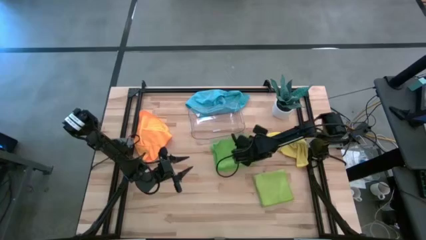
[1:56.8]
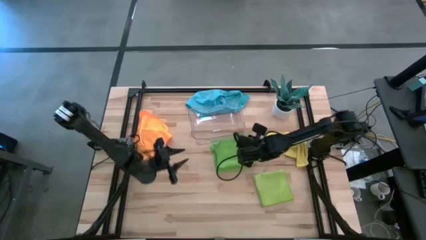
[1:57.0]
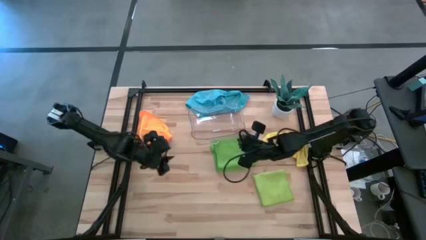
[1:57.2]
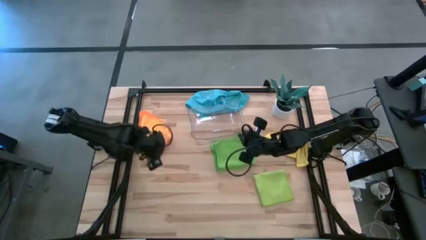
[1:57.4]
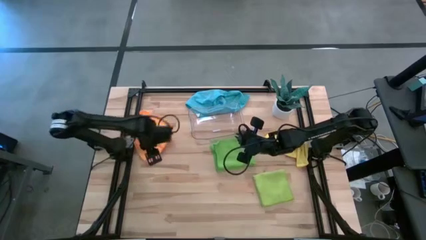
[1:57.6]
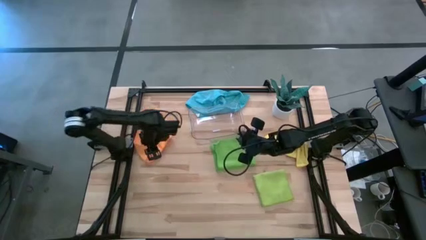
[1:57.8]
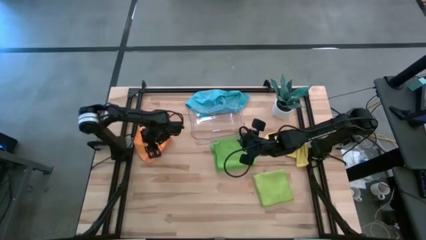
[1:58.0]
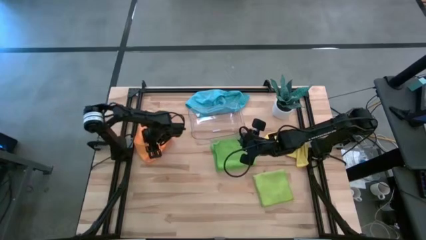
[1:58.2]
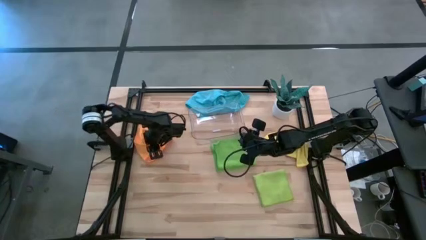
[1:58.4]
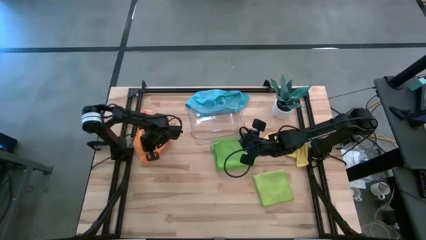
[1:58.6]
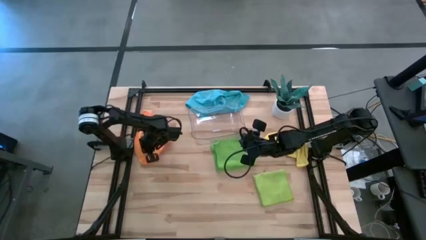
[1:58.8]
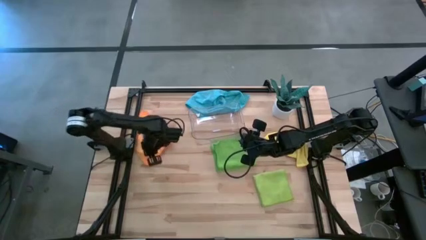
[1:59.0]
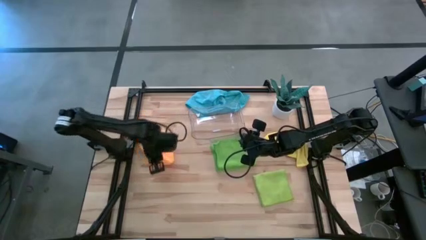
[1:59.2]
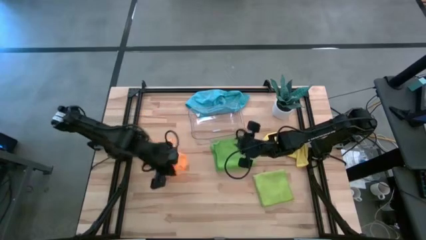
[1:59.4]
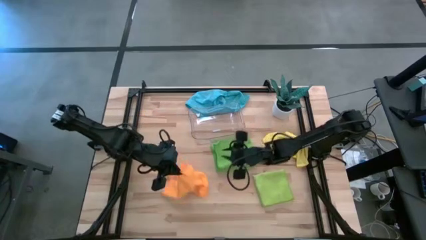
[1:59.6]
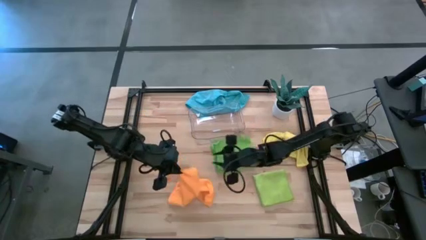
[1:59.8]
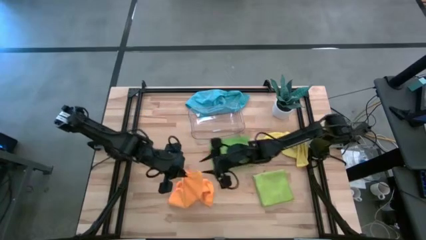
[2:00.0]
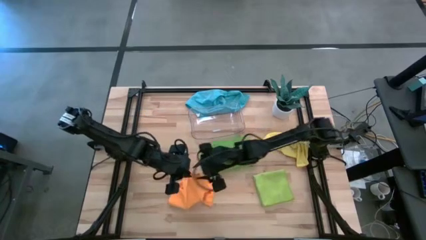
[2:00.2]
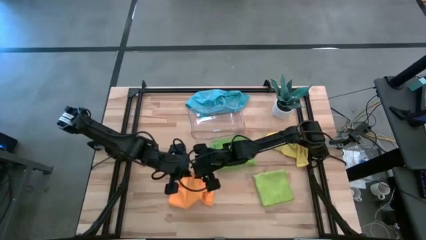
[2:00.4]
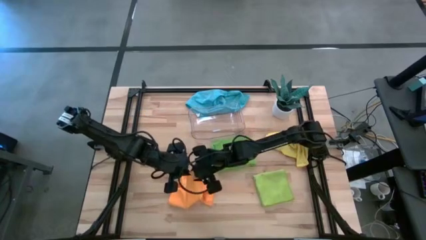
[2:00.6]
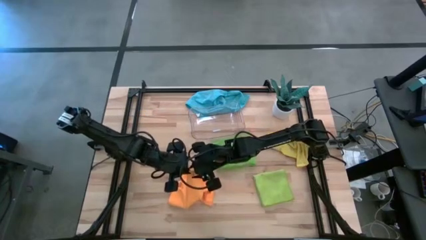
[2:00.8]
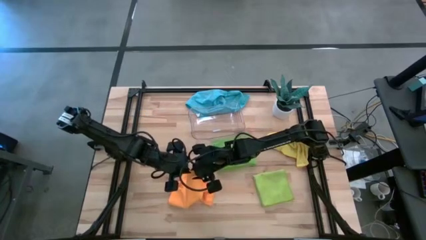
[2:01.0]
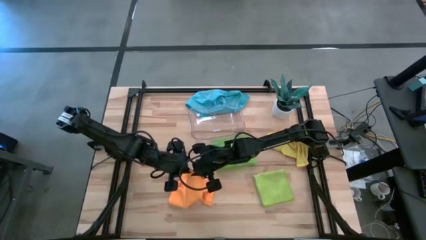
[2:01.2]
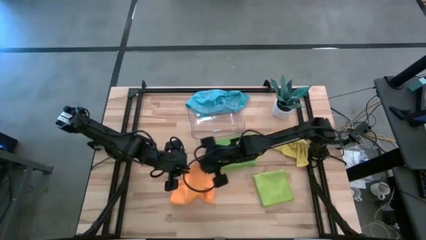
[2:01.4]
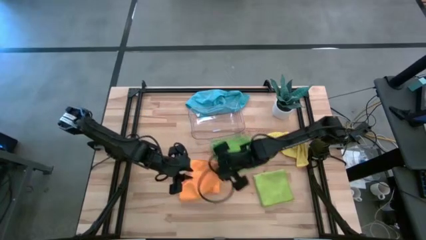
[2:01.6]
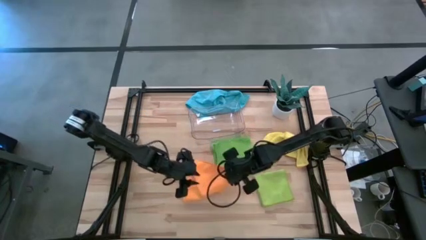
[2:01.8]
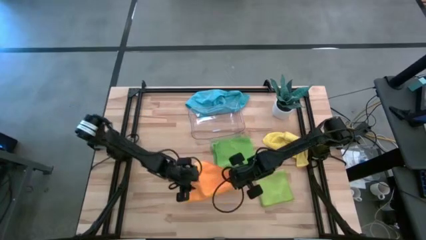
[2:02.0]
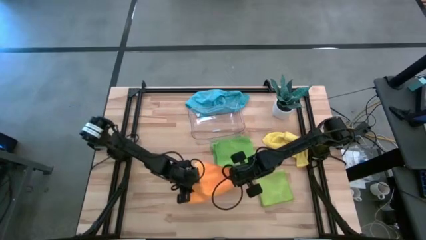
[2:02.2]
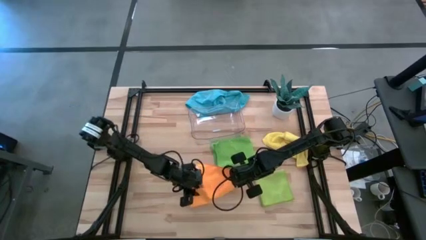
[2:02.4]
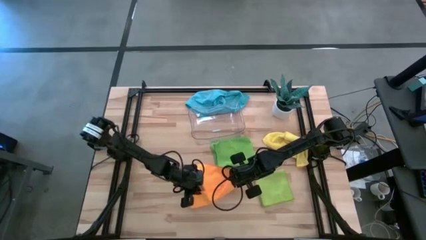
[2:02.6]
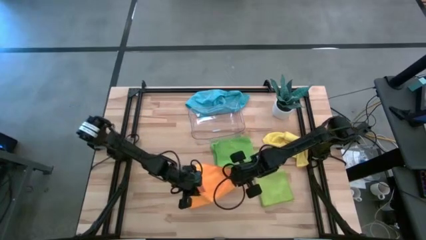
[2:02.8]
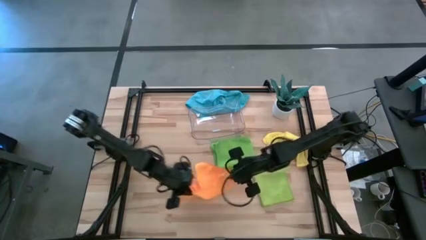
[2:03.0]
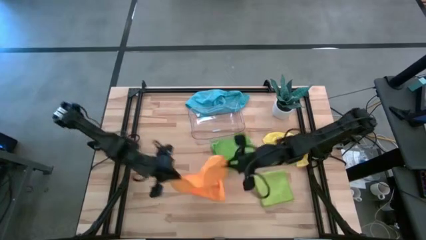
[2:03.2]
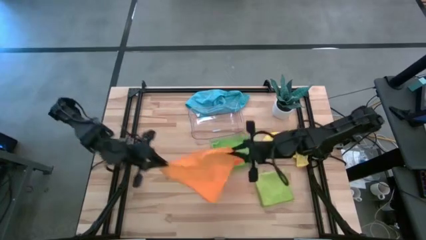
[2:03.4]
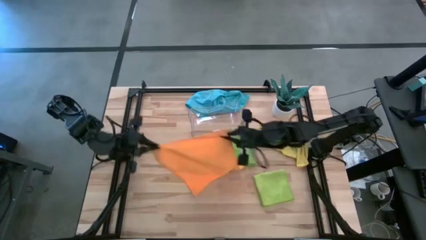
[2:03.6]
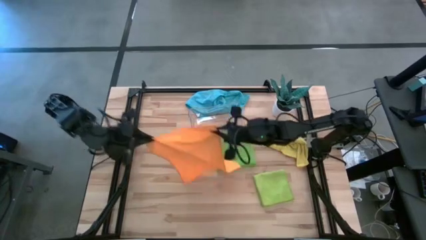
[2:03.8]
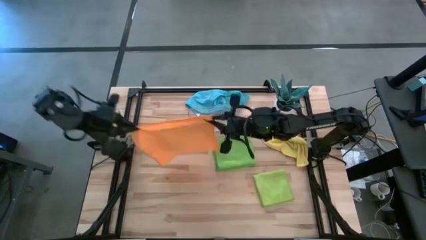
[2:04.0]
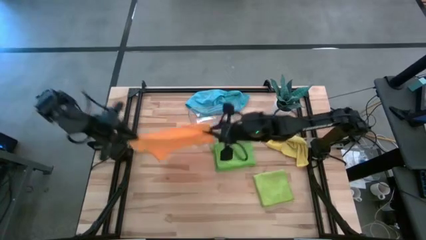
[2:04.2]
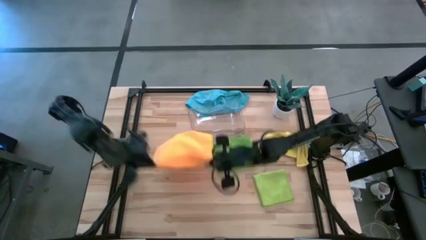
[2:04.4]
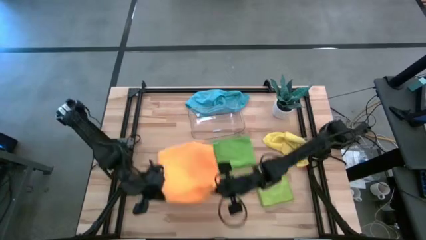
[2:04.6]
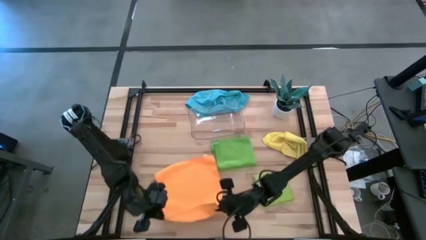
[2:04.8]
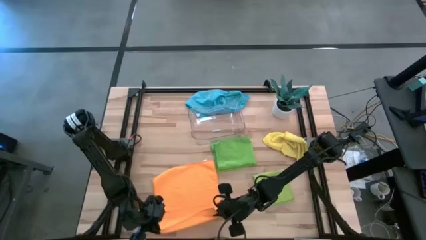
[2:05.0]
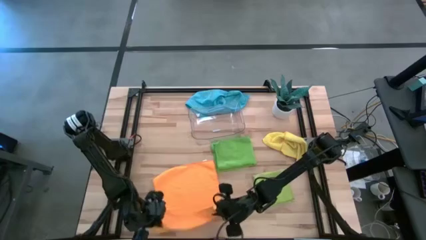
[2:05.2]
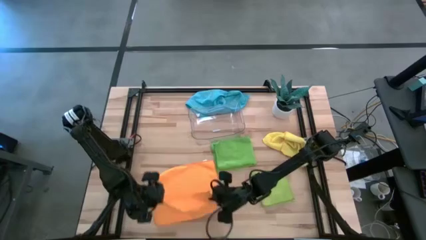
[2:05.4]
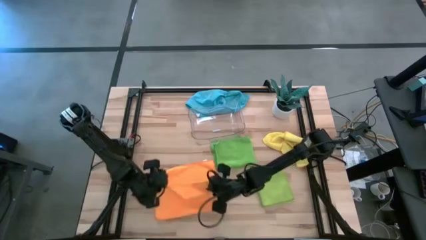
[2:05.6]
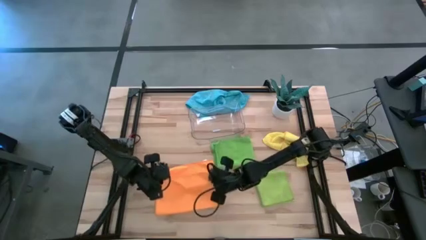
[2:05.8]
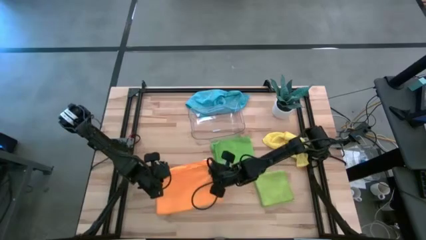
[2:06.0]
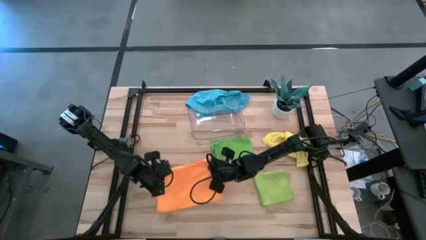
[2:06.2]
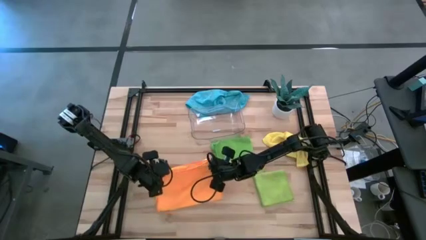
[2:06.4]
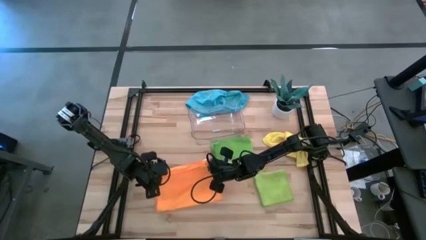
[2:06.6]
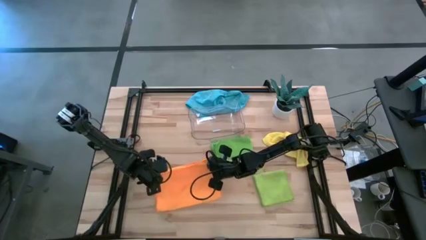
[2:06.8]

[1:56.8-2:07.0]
Task: Fold microfiber towels
Fold the orange microfiber cloth

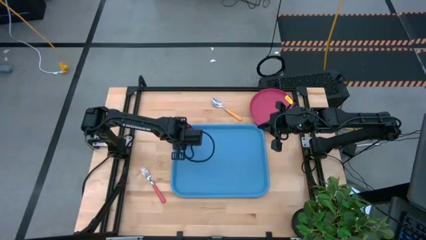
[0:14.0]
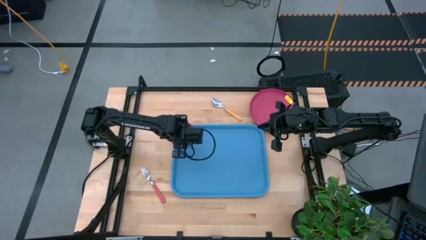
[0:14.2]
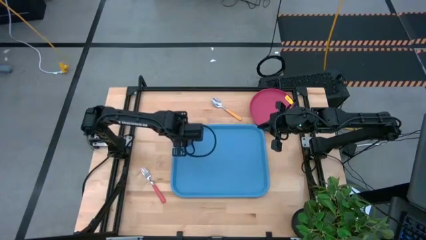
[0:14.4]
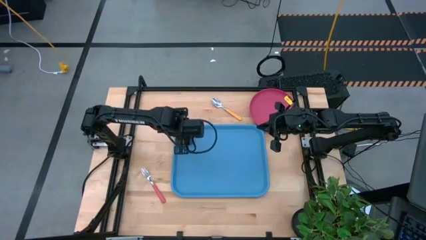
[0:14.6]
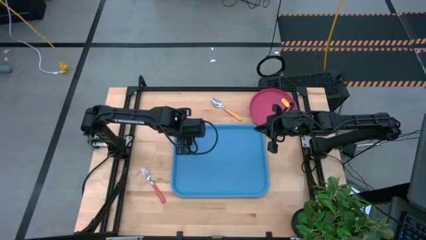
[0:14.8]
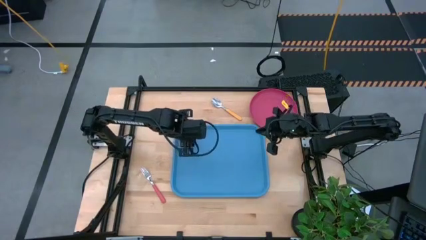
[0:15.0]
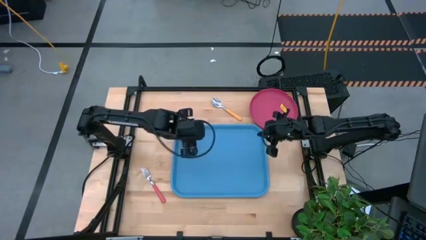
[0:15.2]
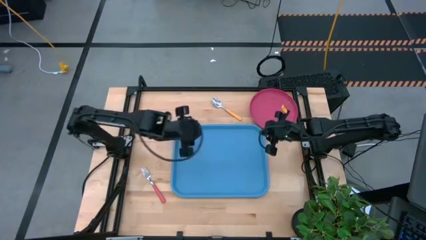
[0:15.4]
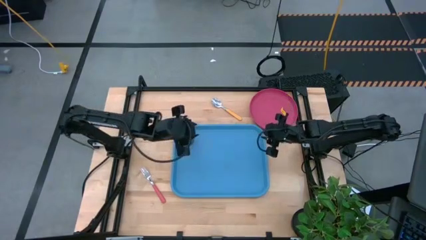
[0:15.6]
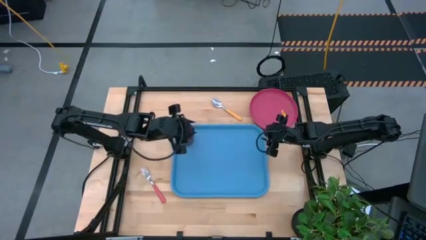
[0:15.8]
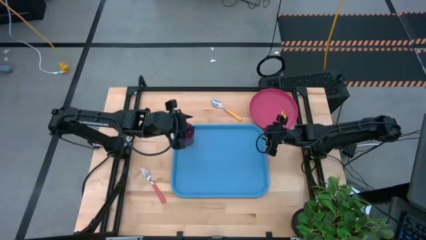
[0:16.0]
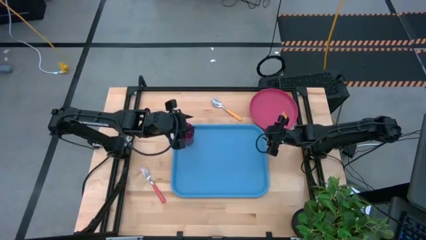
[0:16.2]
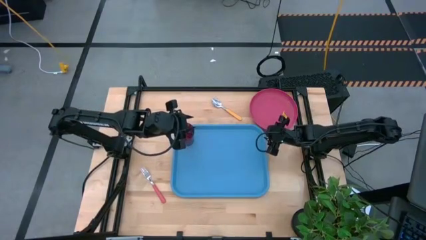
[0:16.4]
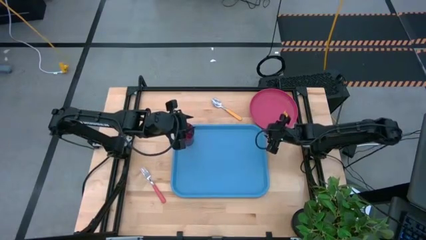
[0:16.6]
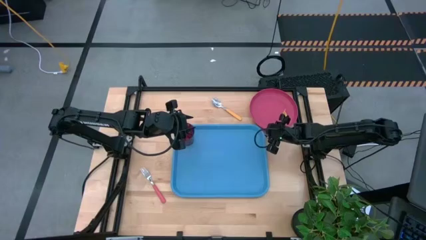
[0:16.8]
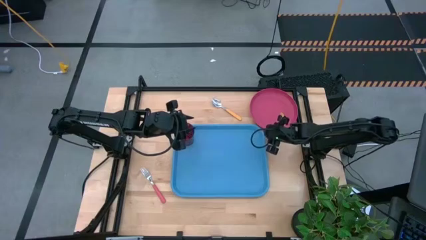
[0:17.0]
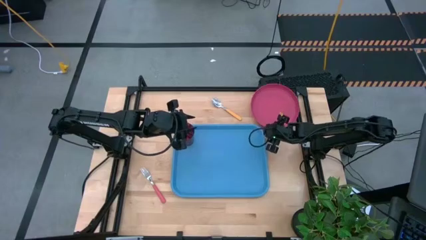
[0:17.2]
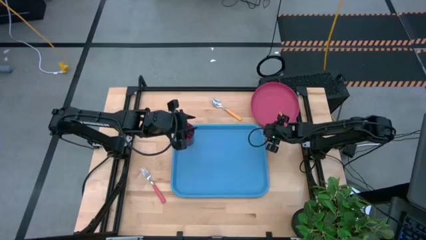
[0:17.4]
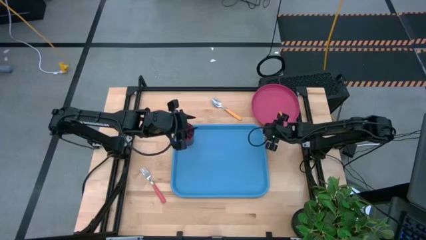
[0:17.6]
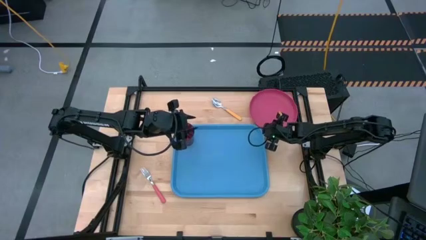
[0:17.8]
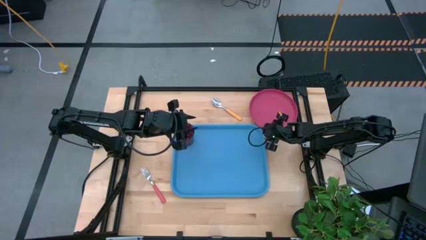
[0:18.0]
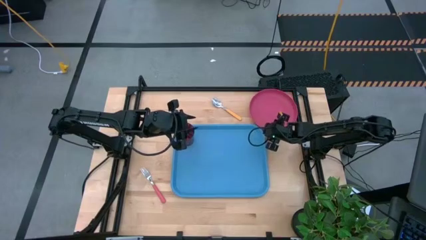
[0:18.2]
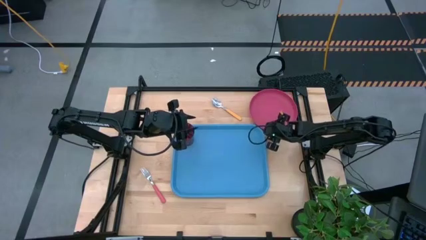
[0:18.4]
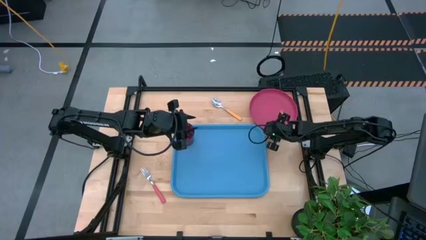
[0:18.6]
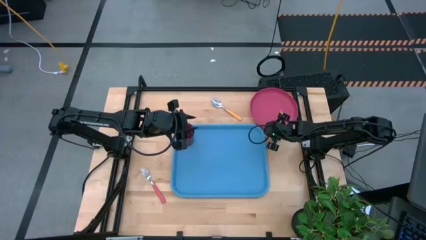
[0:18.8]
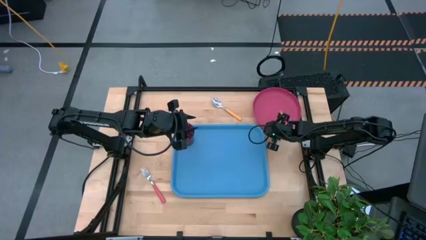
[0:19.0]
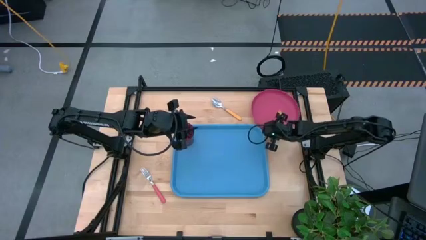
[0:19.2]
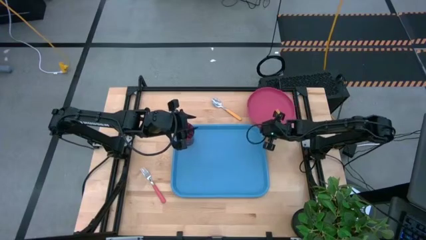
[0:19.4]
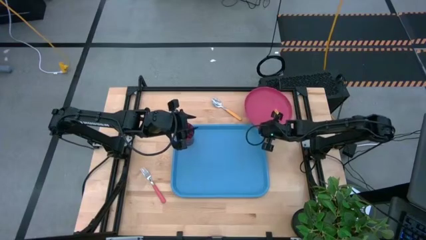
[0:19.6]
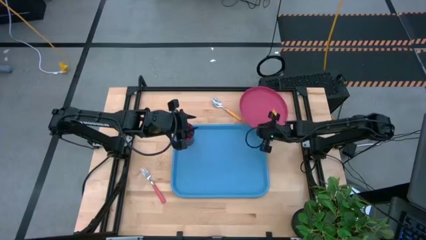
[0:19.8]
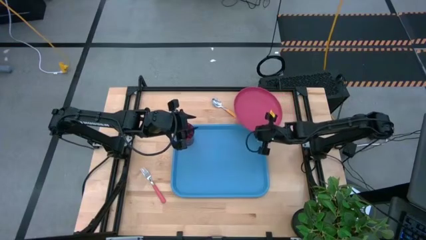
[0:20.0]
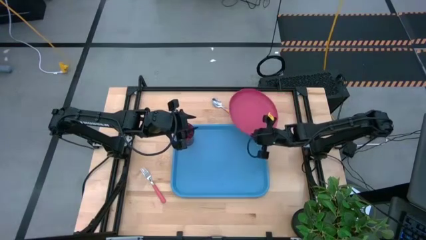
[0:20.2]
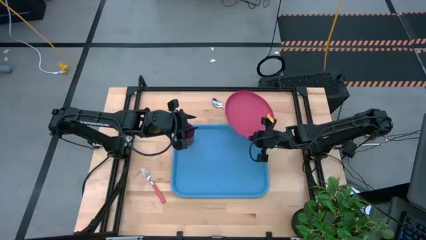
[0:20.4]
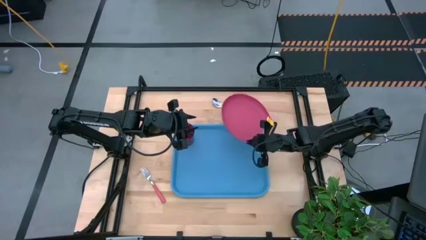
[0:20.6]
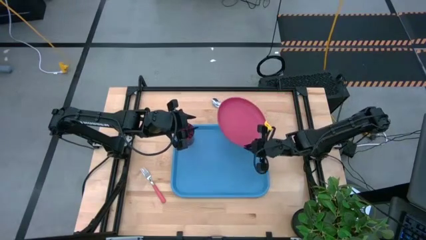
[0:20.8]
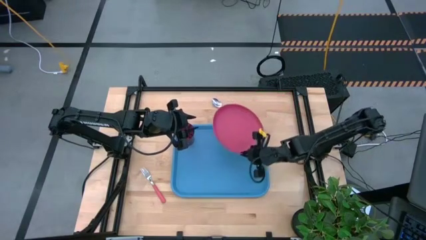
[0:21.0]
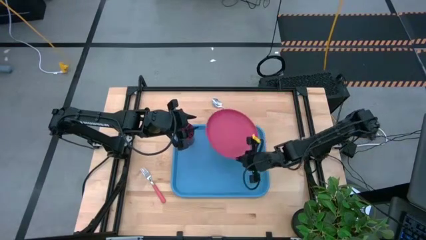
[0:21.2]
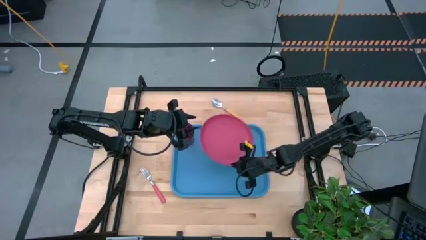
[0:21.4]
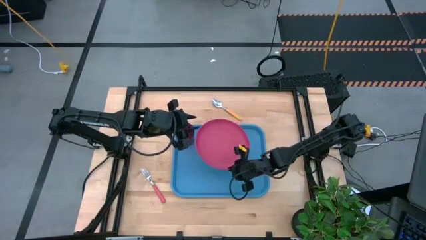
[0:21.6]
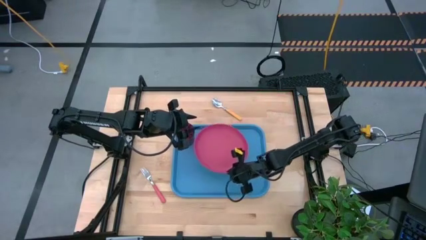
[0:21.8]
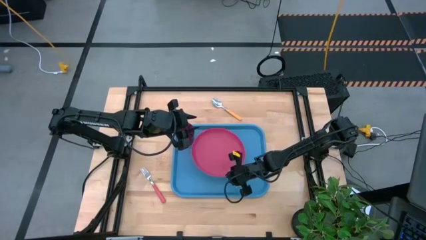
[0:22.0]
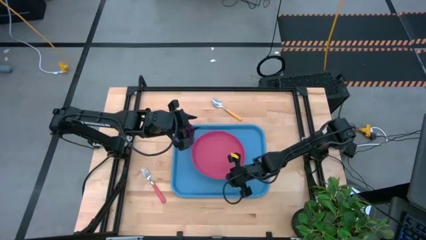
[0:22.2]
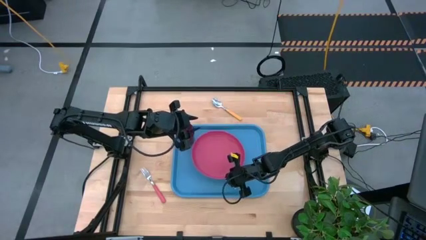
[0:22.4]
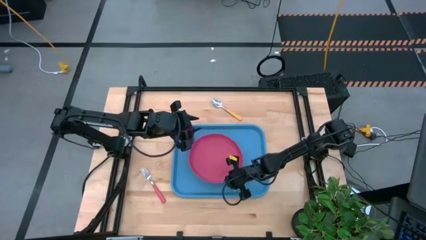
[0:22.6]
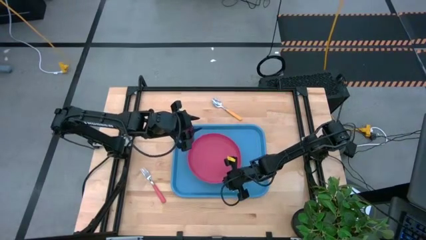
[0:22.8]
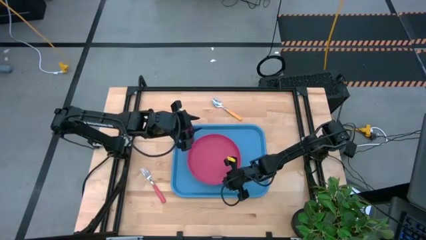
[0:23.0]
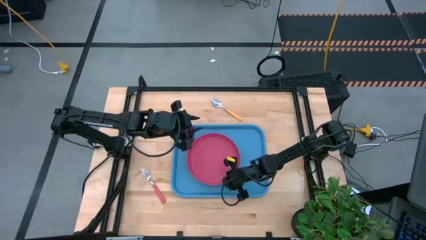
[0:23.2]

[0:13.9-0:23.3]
Task: Pick and place plate/cup/fork/spoon on tray
Put the pink plate on the blue tray to the bottom right of the red glass
